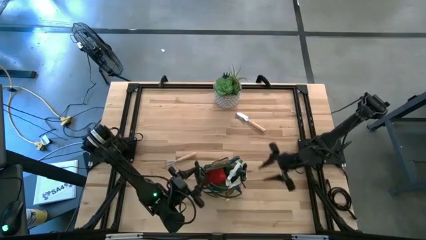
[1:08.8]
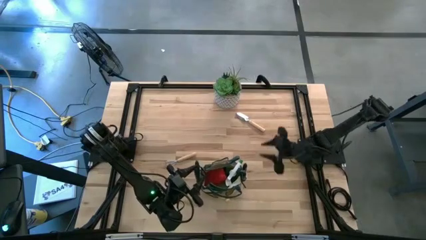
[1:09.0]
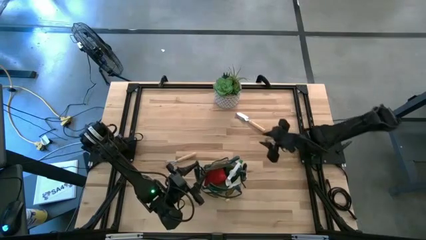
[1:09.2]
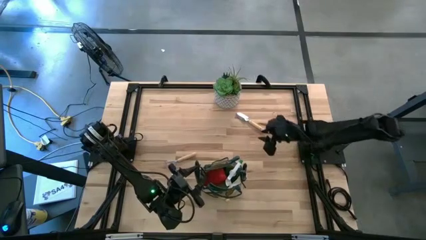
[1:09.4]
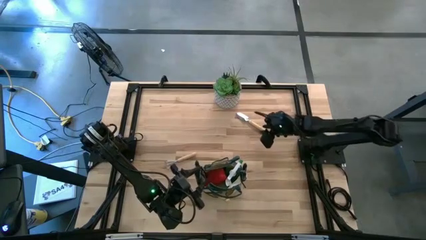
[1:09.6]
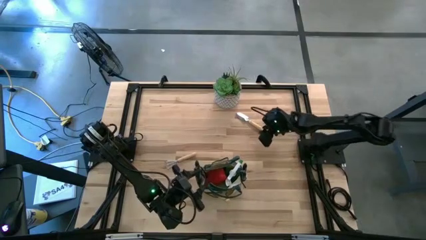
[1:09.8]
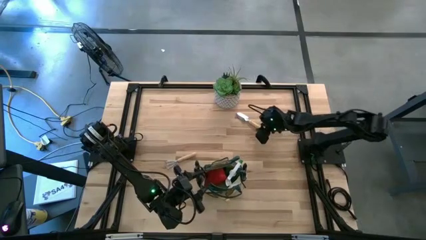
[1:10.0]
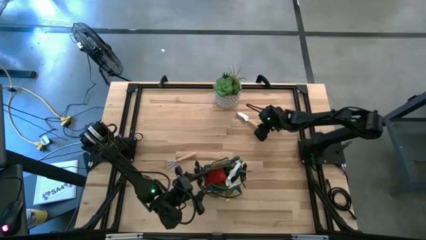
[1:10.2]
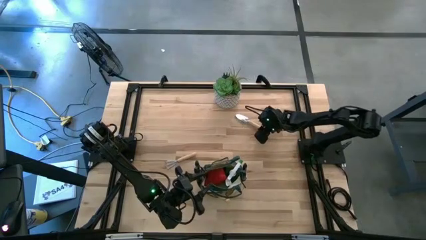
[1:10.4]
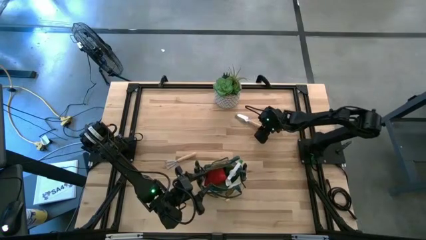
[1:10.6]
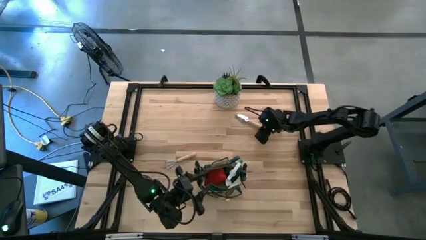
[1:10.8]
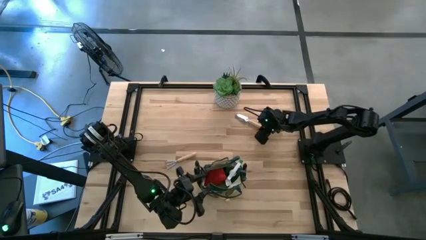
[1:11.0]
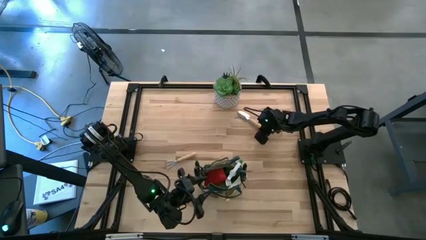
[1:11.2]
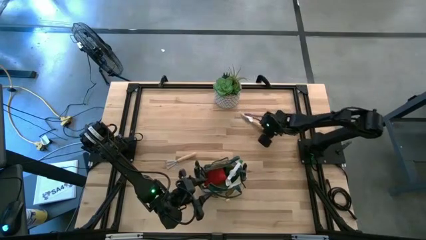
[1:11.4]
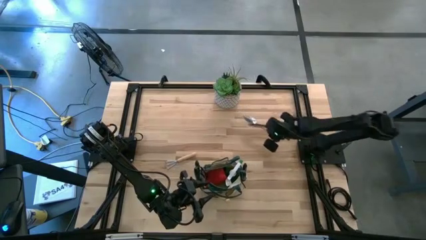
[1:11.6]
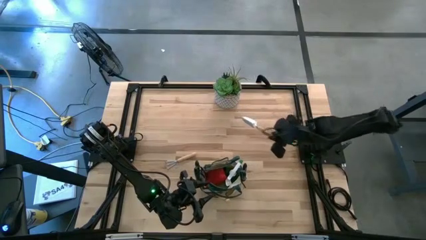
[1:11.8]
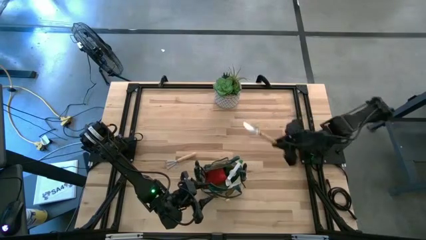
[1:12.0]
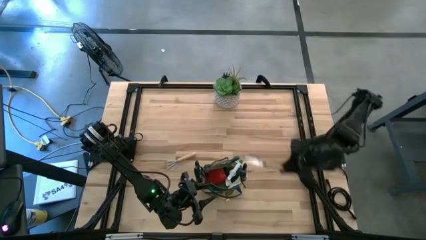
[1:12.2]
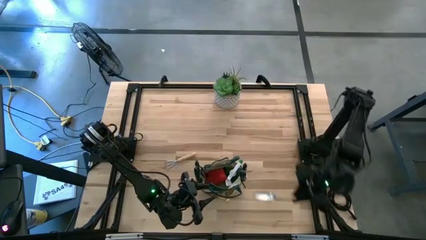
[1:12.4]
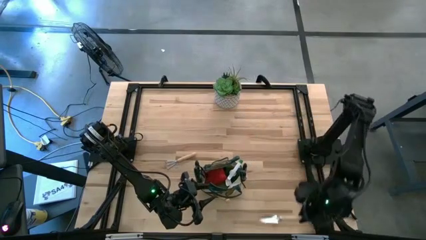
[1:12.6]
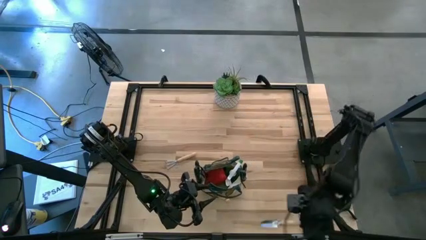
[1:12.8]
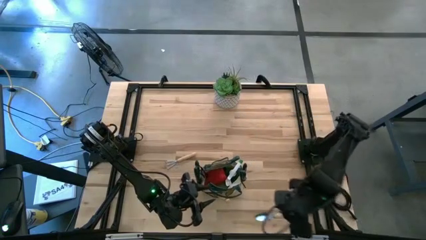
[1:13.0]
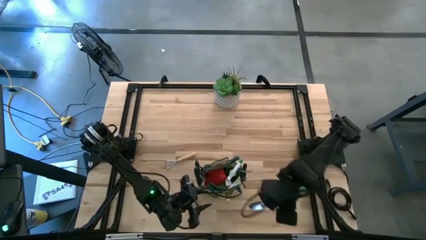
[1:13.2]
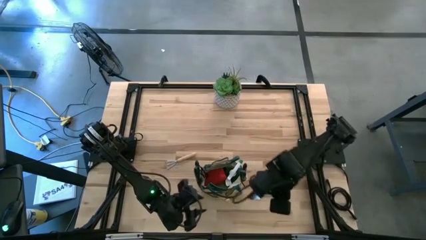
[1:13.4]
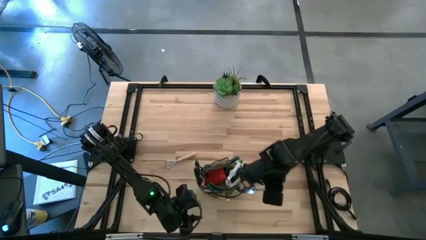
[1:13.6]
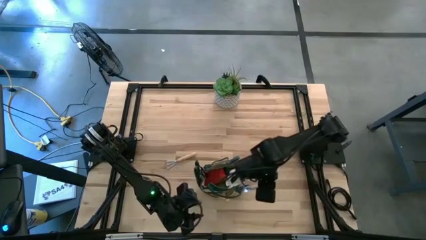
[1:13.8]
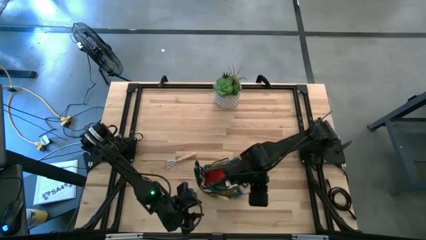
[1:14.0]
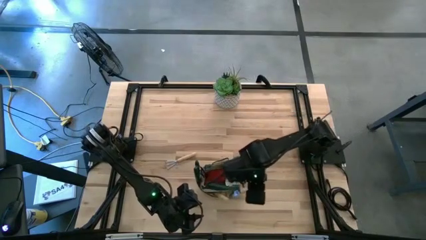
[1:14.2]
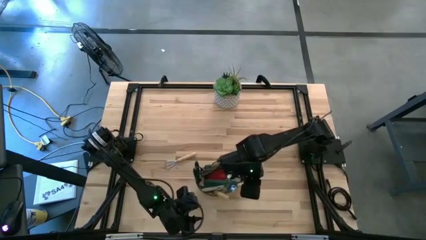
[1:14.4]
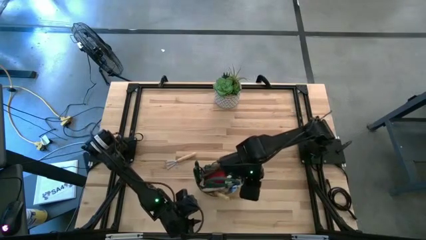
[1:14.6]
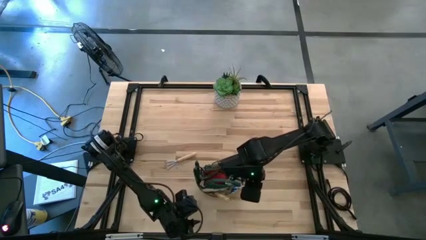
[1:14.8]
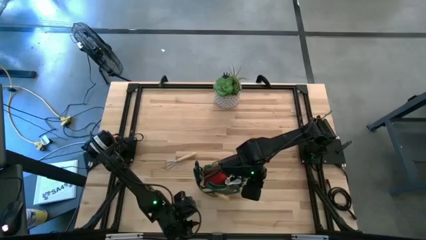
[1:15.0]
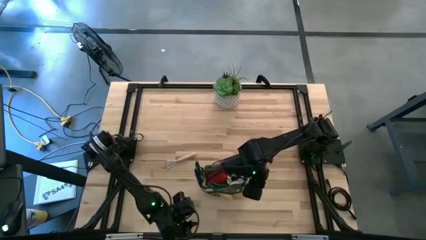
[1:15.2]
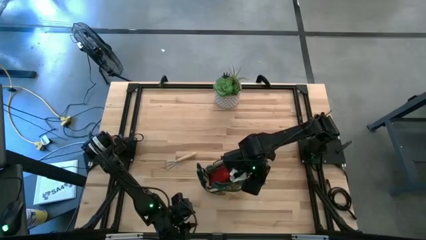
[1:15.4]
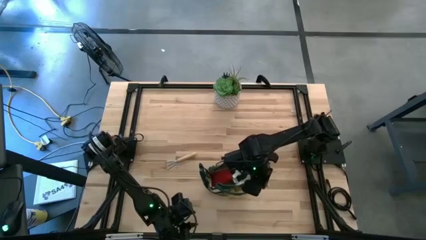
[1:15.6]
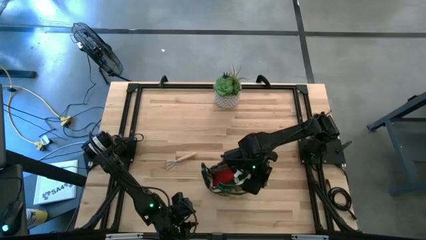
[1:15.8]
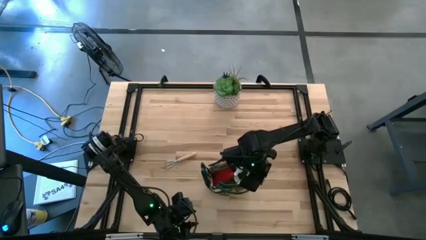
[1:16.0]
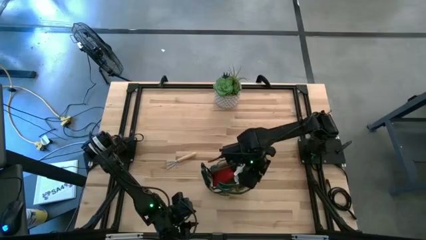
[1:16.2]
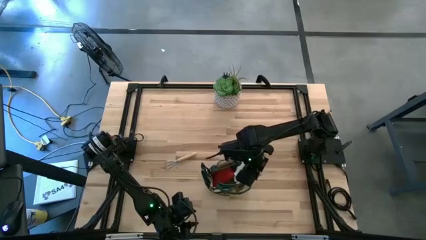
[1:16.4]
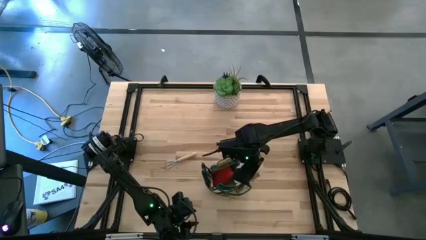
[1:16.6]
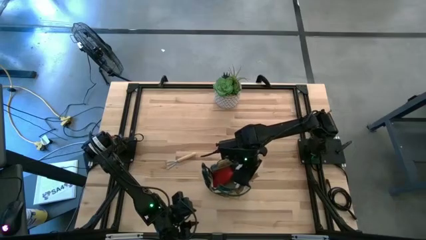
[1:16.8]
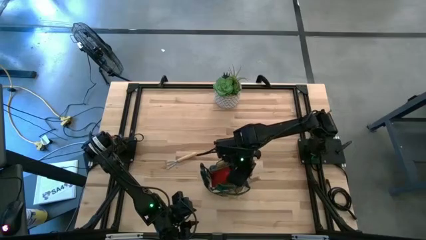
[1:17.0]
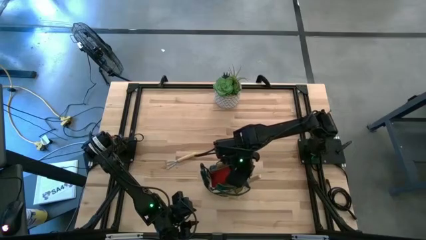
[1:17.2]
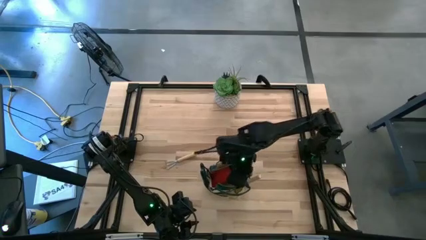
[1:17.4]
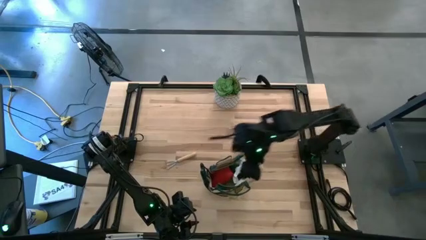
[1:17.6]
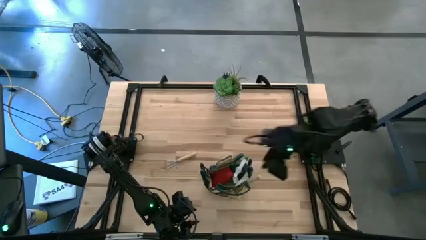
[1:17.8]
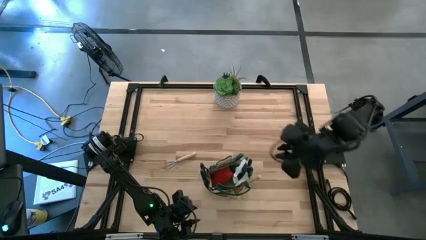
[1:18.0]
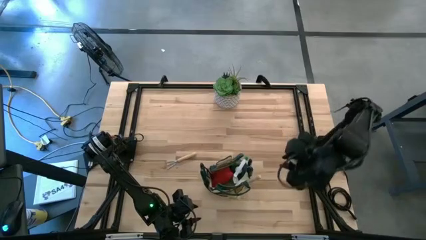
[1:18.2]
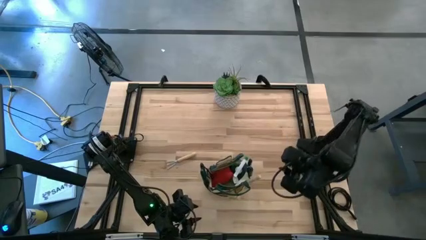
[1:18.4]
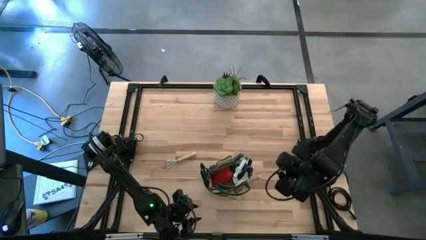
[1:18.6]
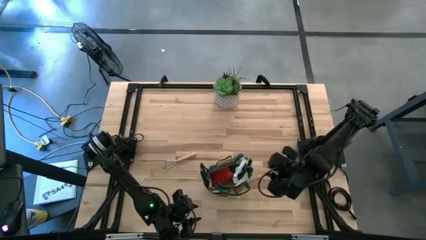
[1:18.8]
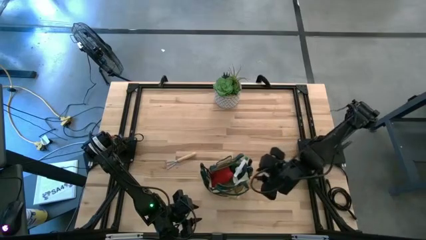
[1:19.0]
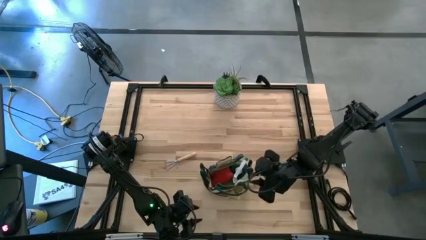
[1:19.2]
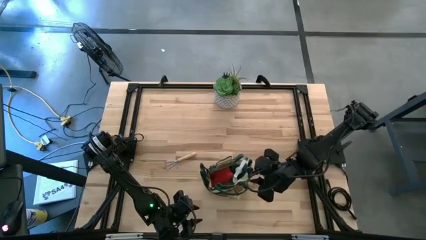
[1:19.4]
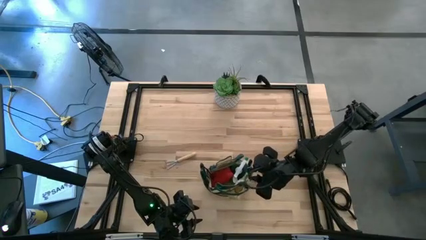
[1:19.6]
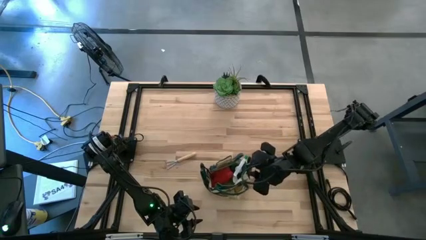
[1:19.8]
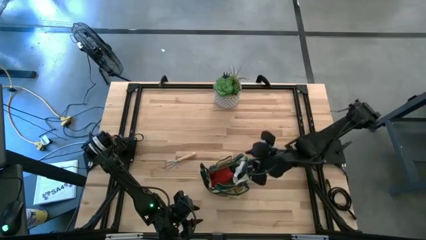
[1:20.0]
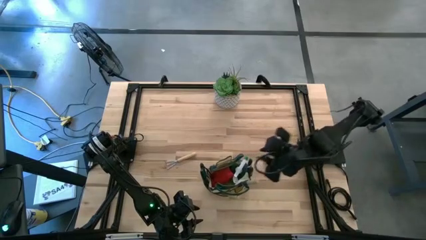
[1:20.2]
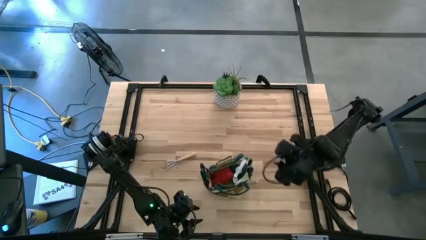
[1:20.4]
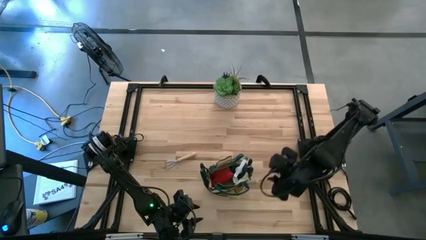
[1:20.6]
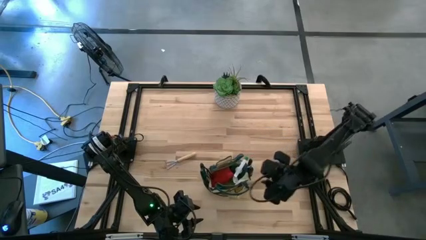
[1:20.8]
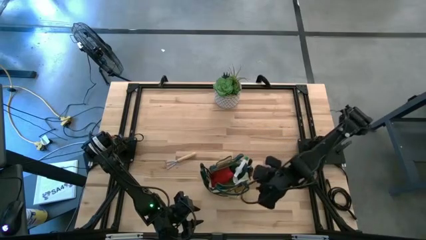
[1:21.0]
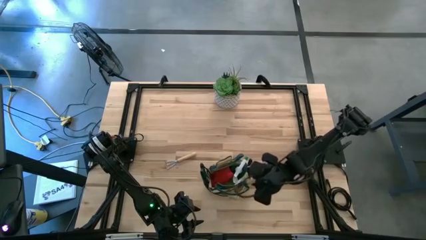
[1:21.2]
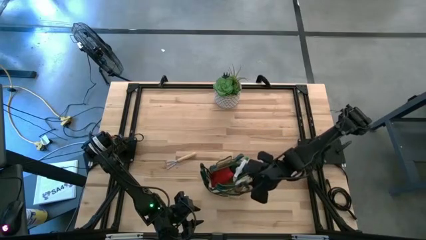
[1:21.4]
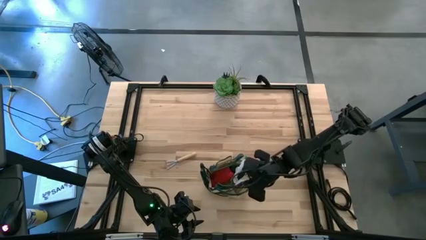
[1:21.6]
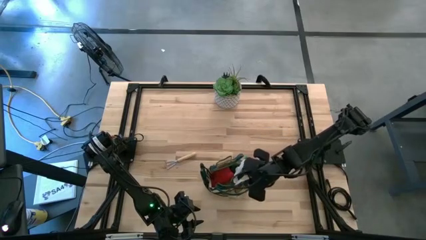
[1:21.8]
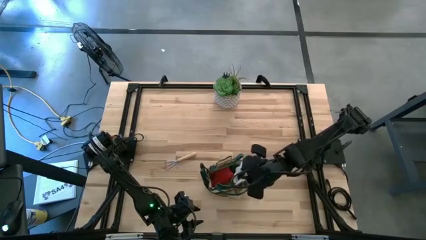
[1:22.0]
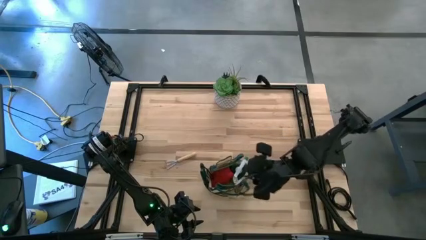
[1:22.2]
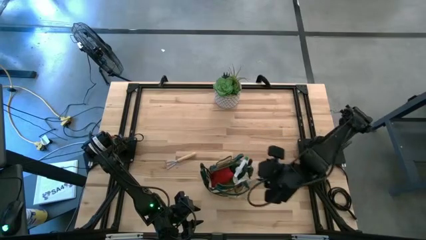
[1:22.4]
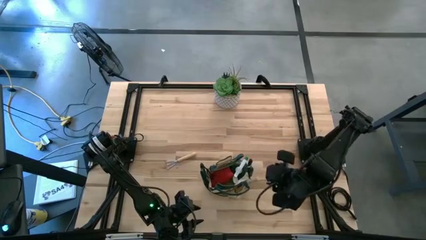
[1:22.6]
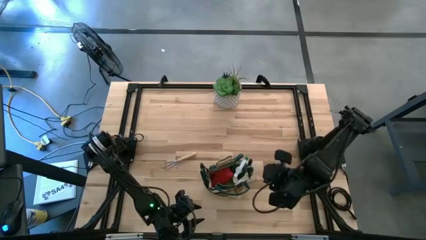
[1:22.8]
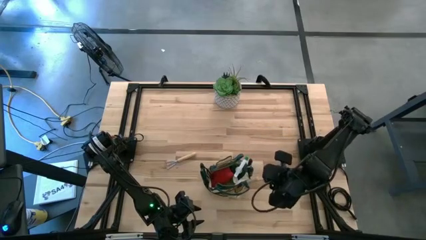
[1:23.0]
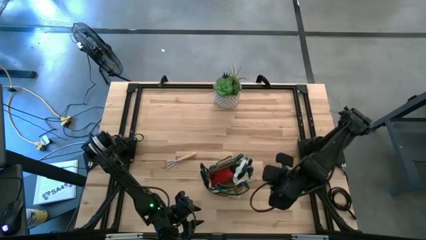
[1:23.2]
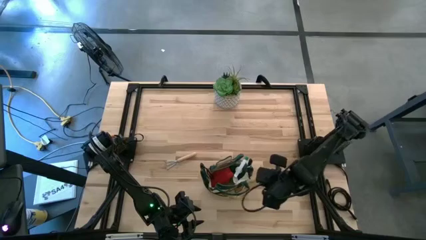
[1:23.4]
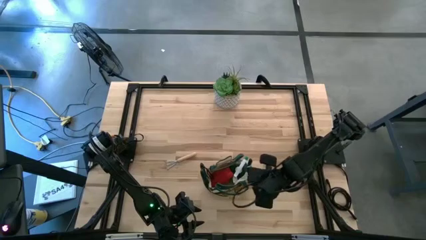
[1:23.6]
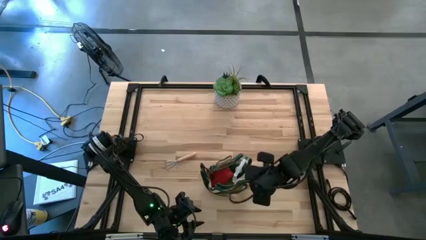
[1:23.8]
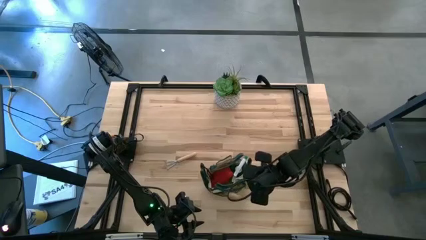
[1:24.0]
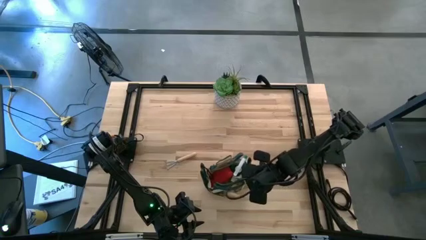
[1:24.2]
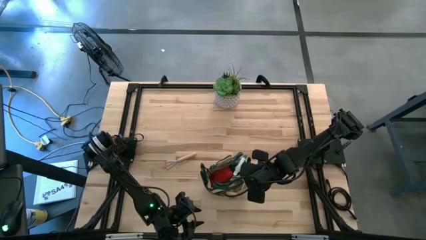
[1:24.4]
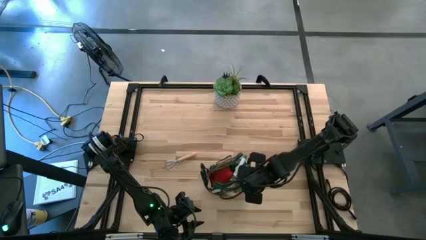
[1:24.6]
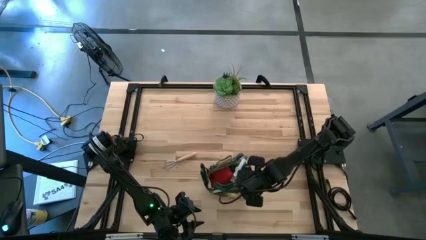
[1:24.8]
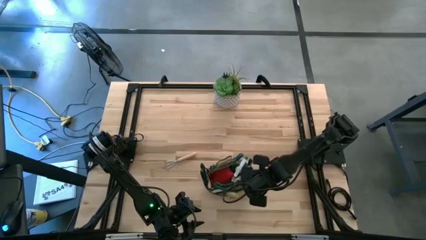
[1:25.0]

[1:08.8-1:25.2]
Task: Pick & Place Garden tools in Gardening bag
Put the brown trowel into the green gardening bag
